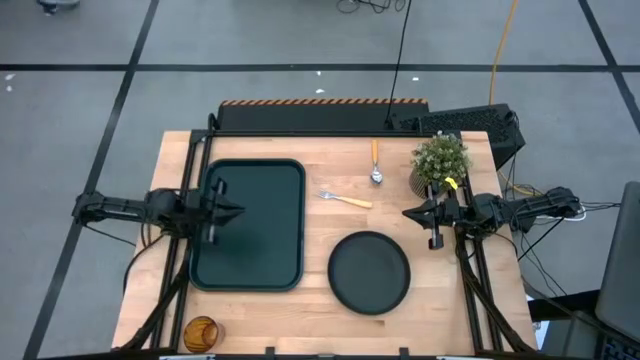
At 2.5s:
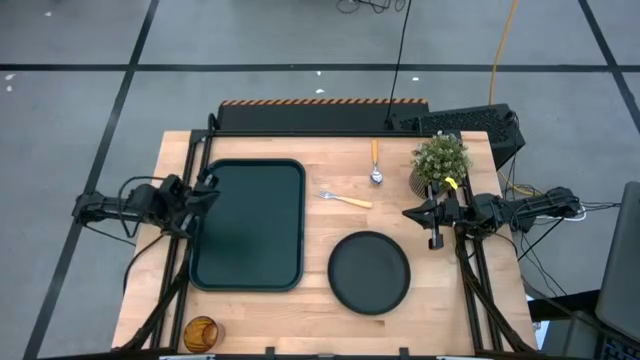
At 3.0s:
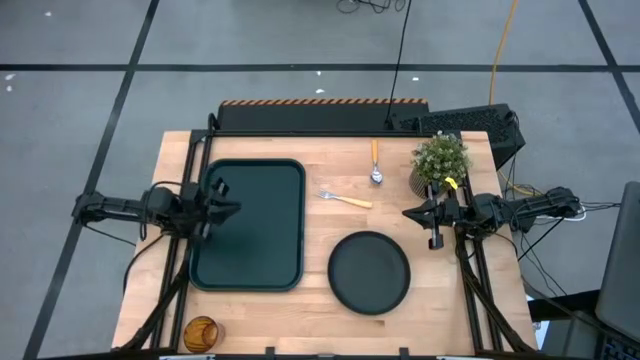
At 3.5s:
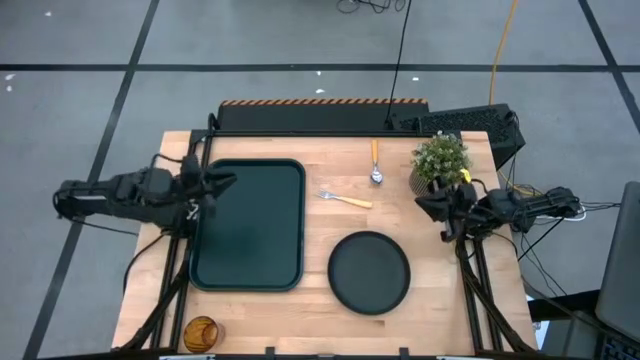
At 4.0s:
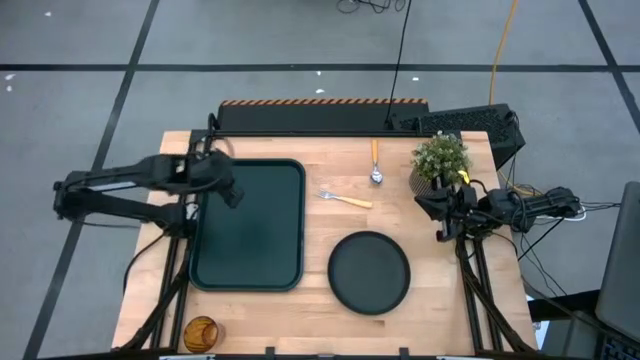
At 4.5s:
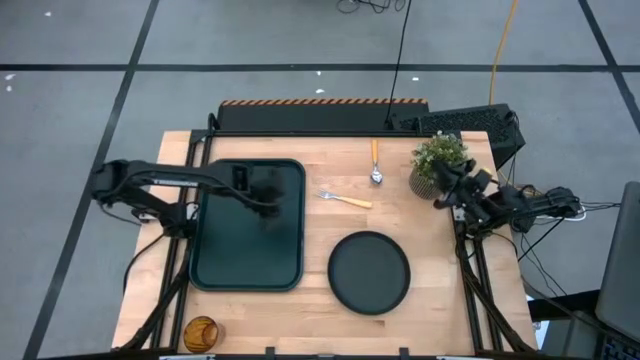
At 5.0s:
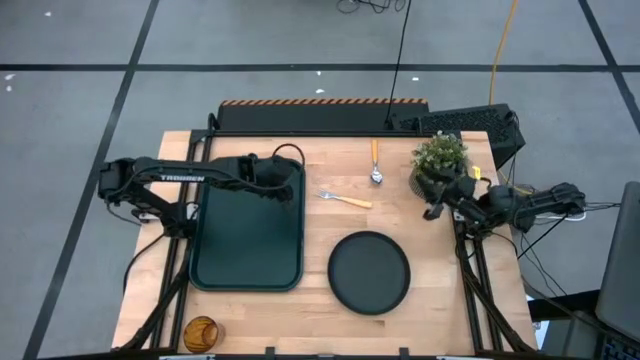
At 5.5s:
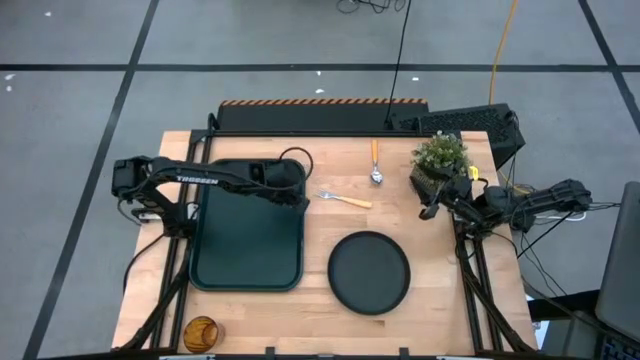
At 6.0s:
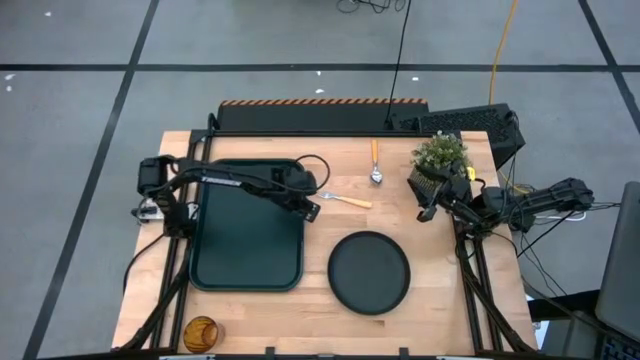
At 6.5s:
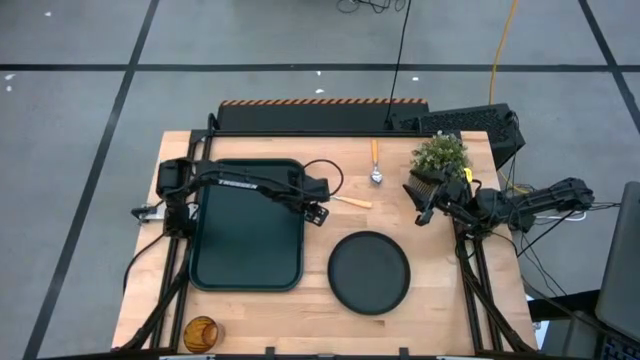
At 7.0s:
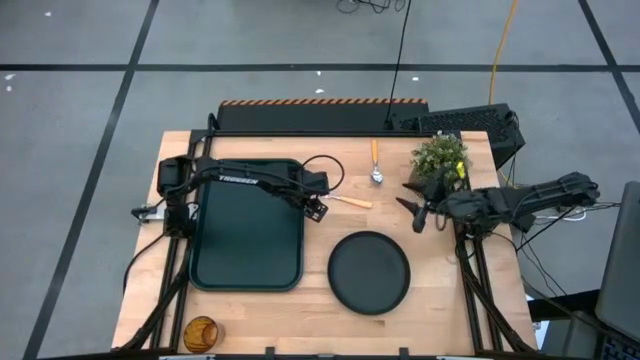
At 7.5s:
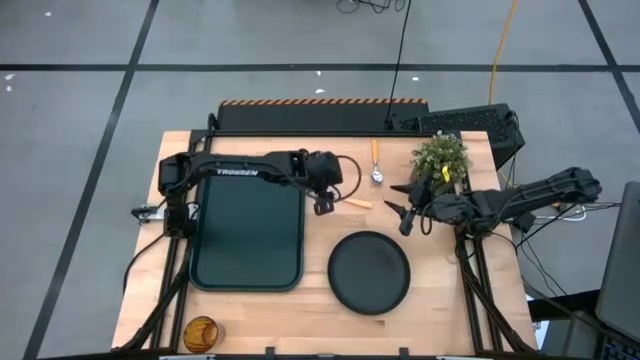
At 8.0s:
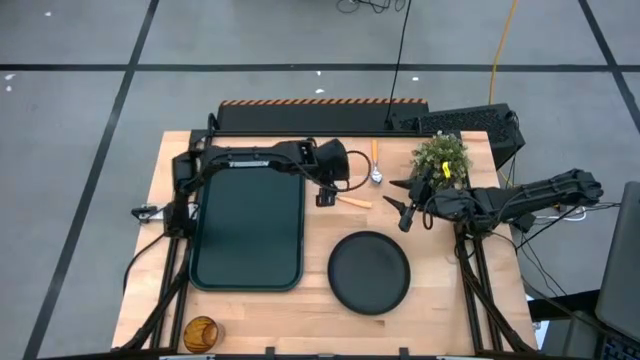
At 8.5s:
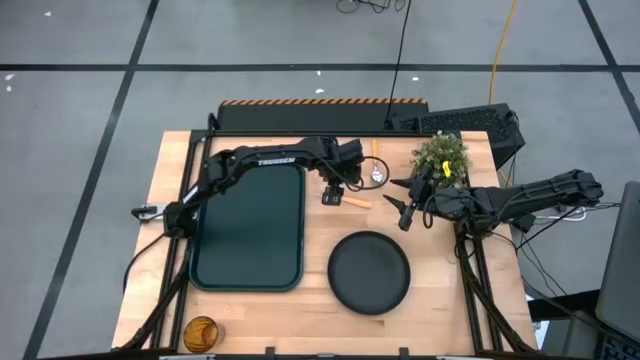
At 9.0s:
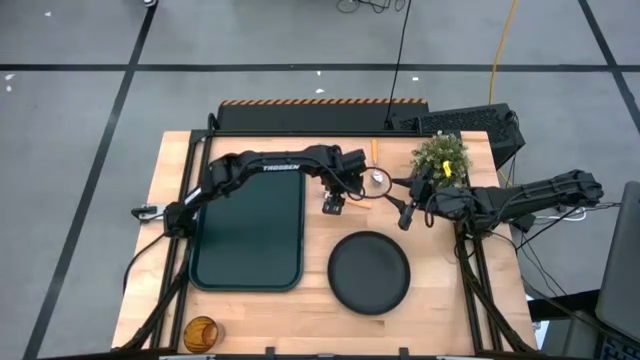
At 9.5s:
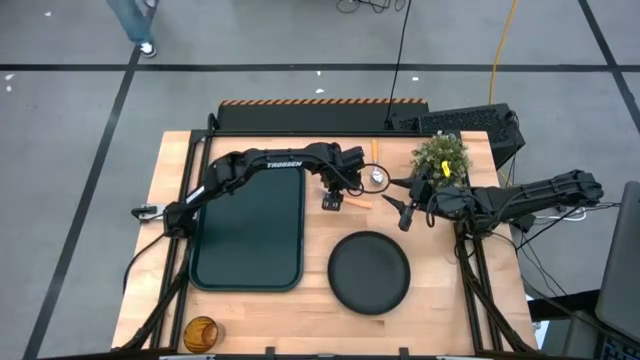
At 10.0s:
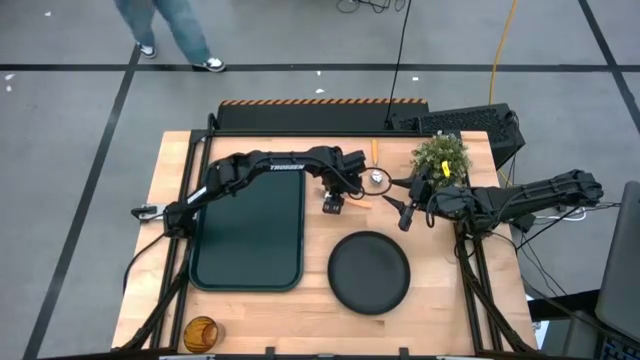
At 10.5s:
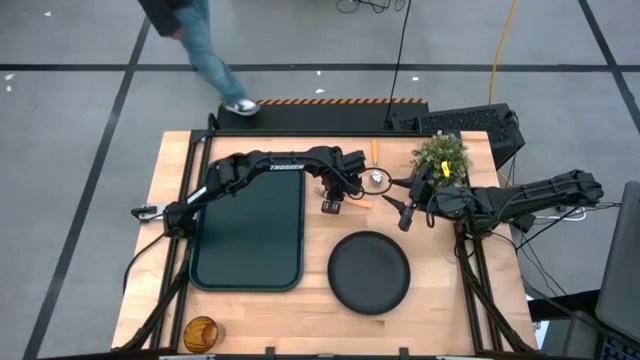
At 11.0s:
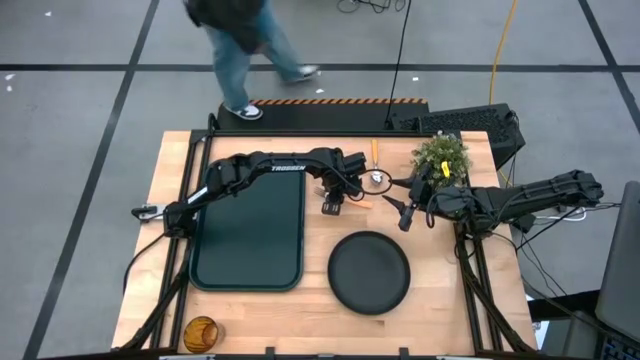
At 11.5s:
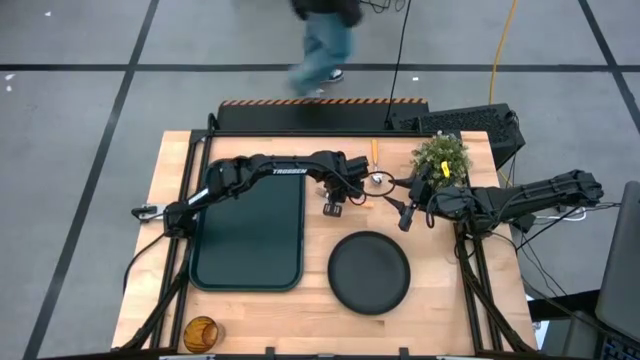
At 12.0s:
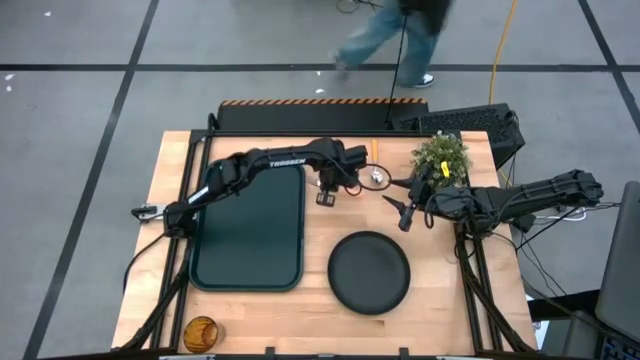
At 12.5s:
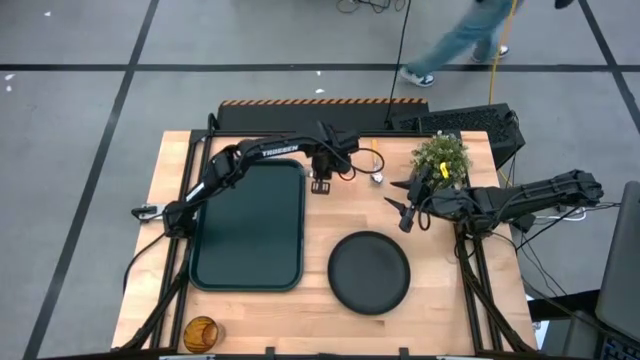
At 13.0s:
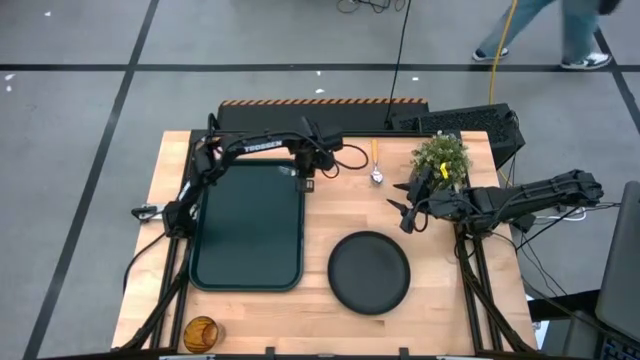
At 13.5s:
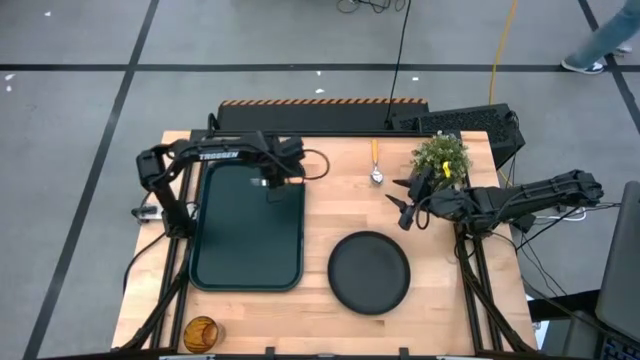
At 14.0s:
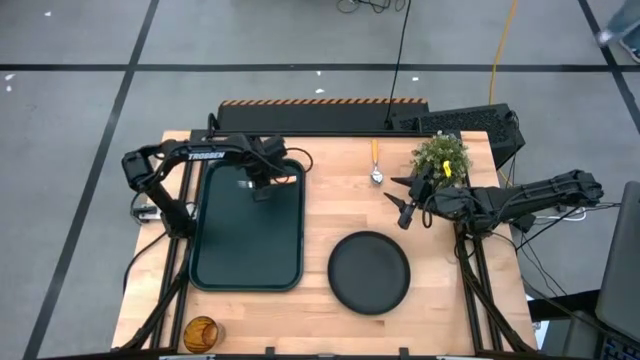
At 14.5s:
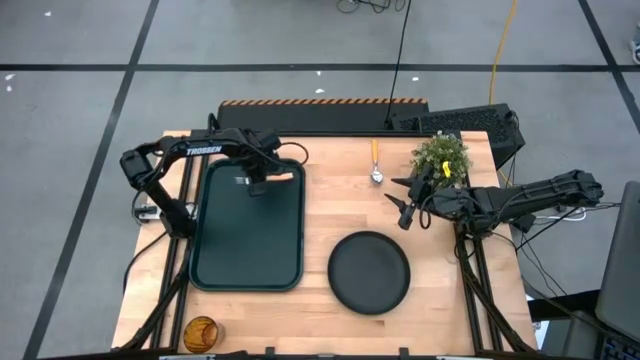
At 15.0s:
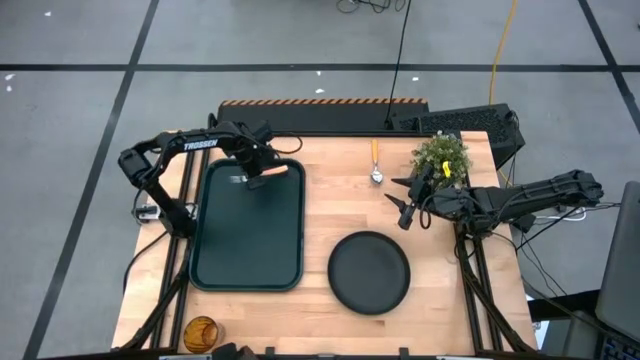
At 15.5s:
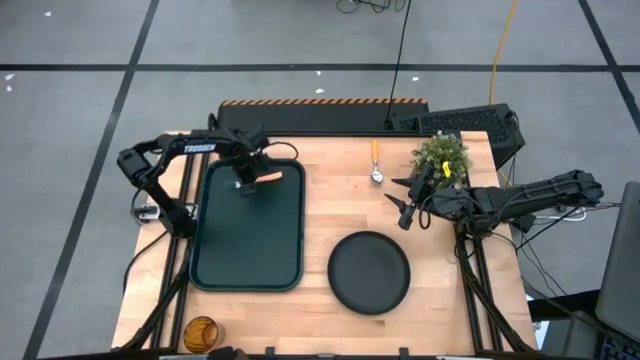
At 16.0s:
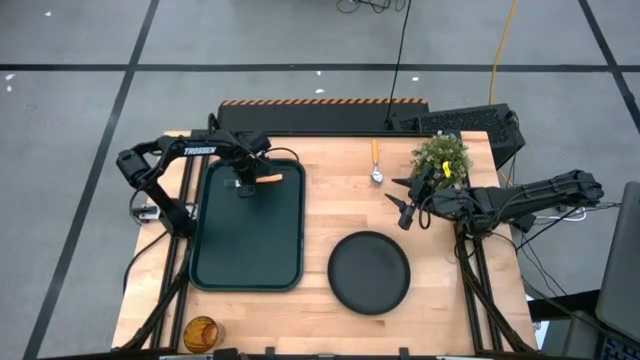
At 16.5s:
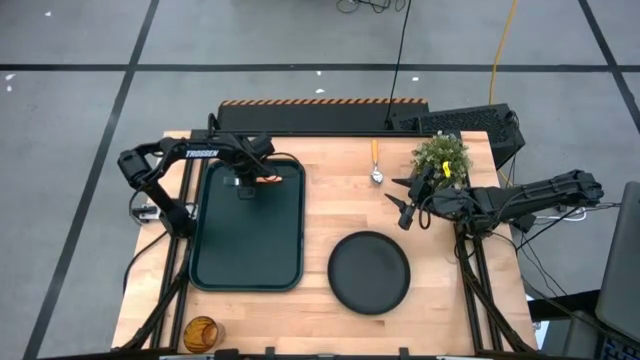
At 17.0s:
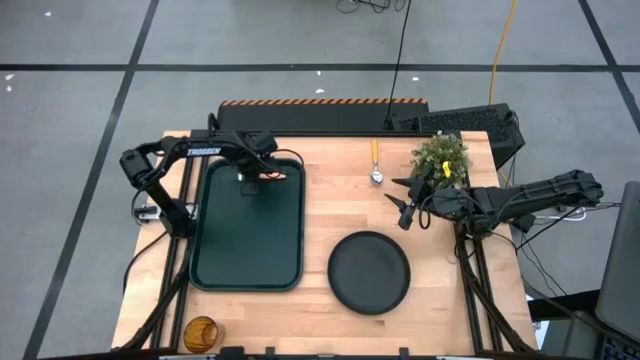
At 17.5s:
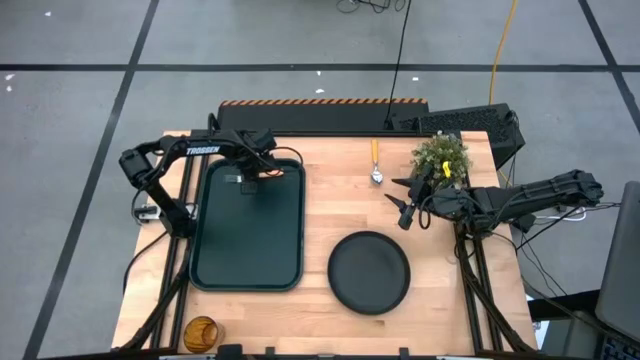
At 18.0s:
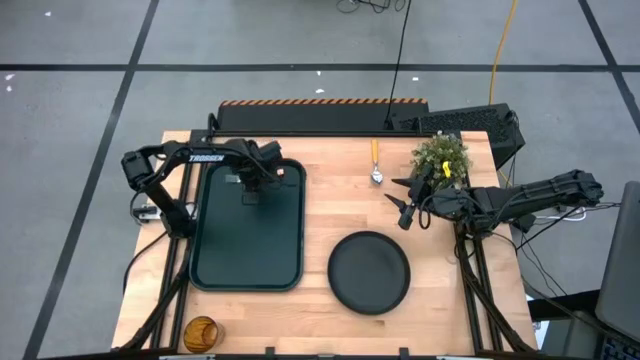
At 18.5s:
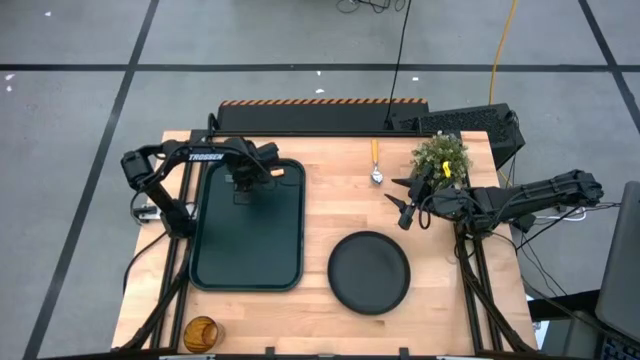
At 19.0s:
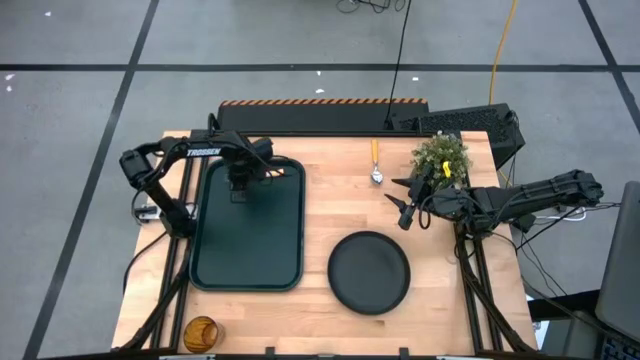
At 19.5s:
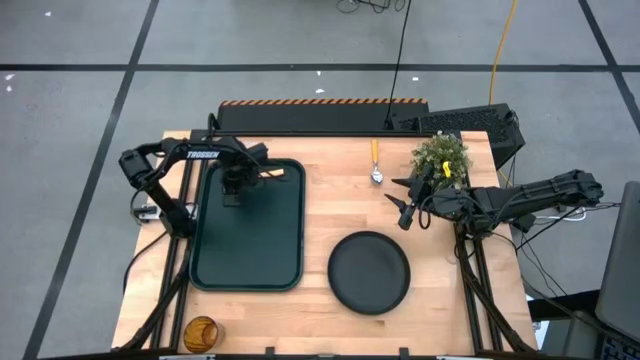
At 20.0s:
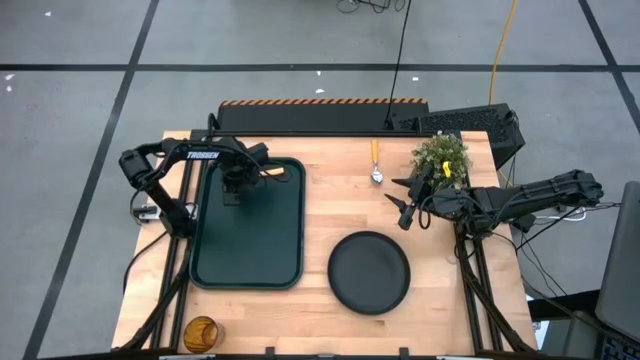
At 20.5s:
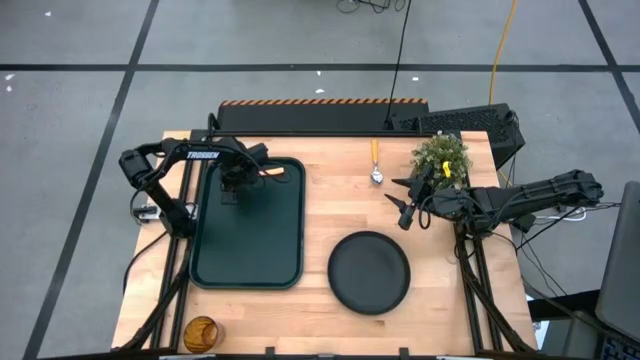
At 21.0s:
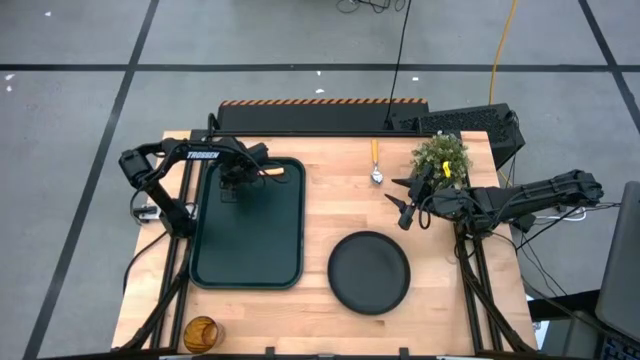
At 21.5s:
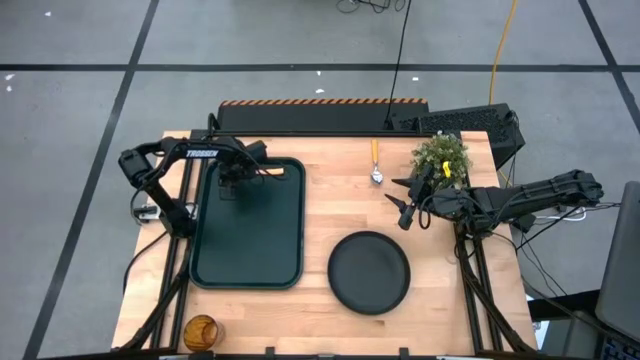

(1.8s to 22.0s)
Task: Pick and place plate/cup/fork/spoon on tray
Put the orange fork on the black tray
